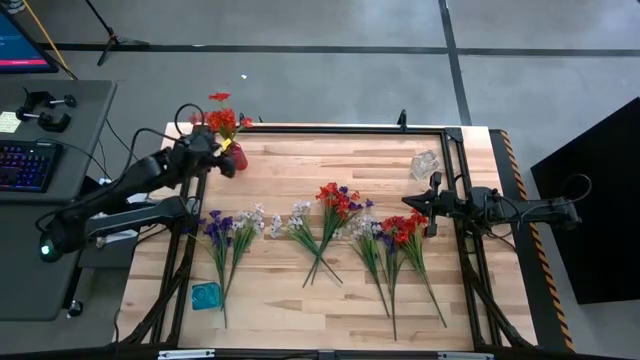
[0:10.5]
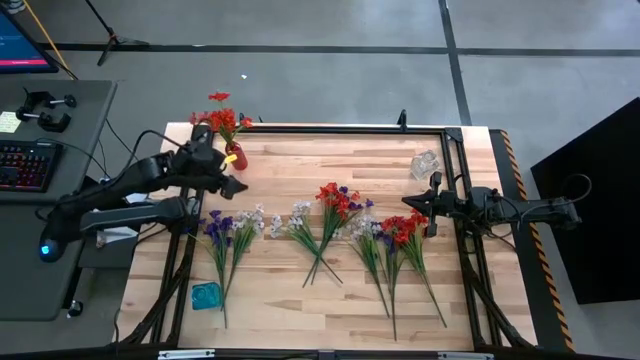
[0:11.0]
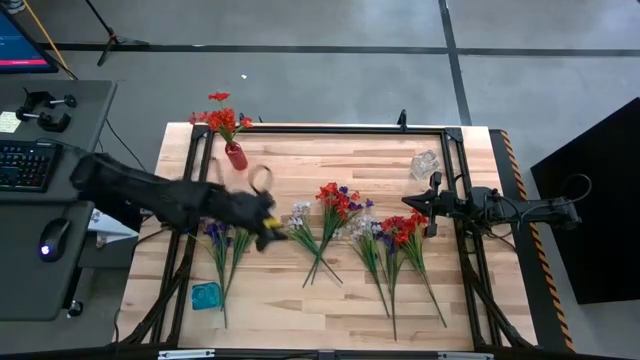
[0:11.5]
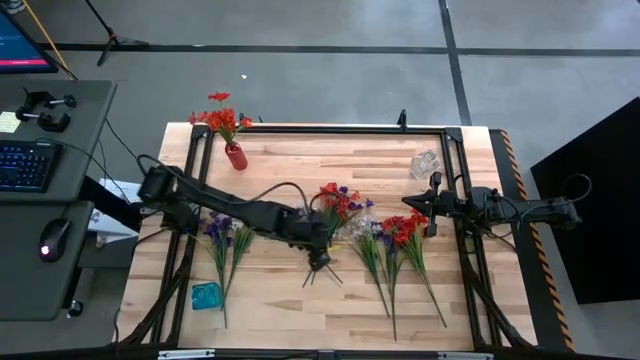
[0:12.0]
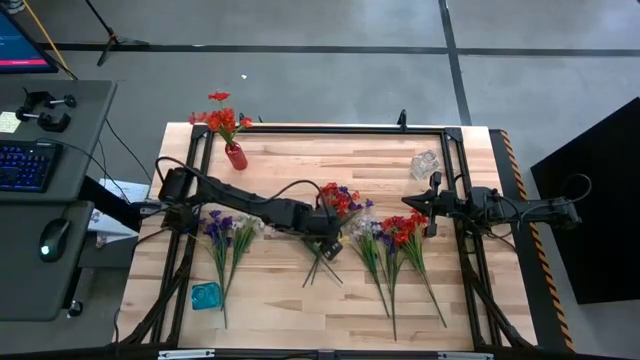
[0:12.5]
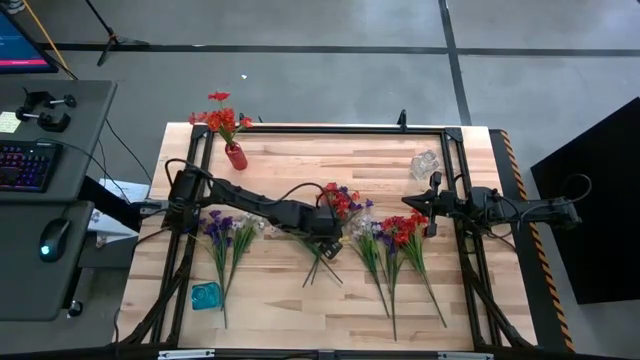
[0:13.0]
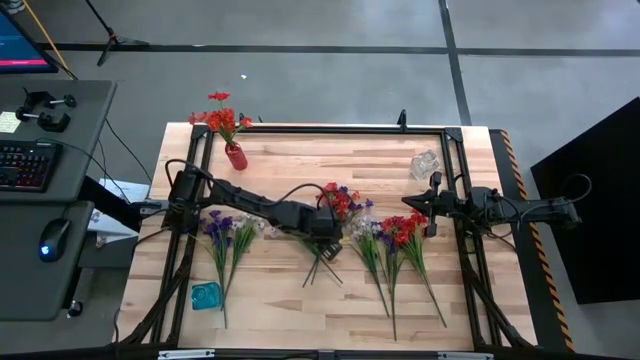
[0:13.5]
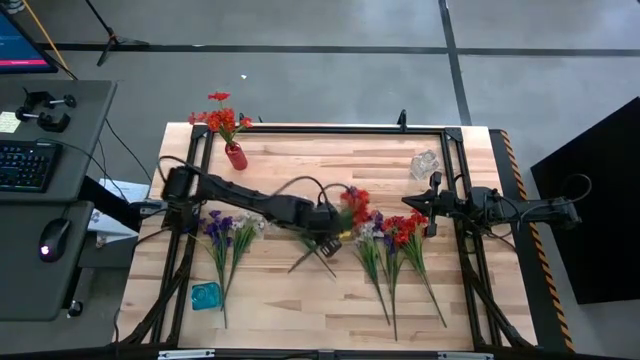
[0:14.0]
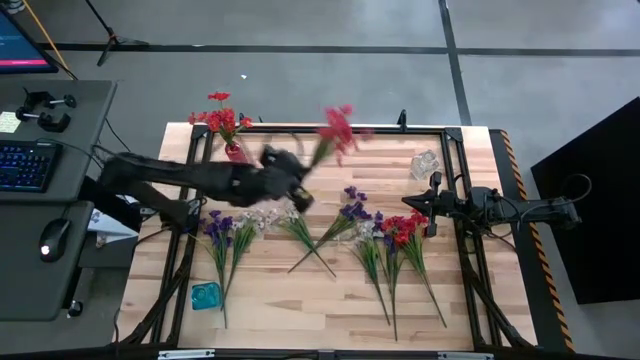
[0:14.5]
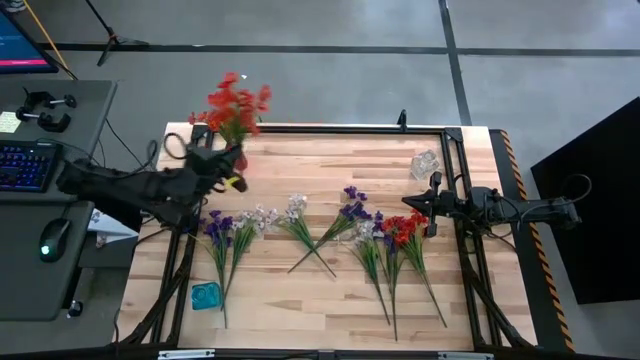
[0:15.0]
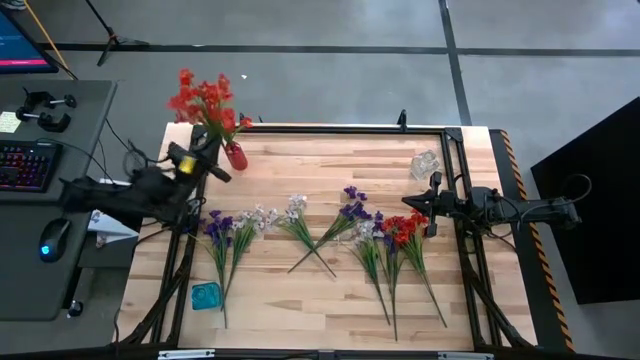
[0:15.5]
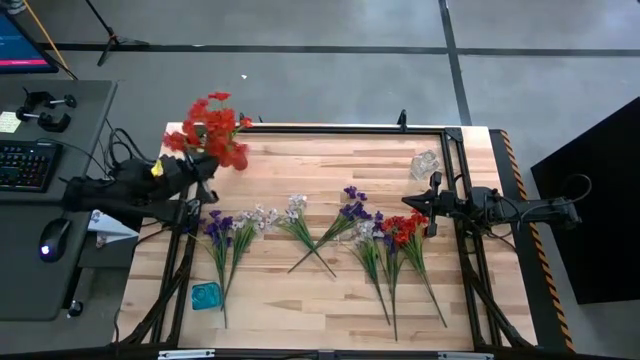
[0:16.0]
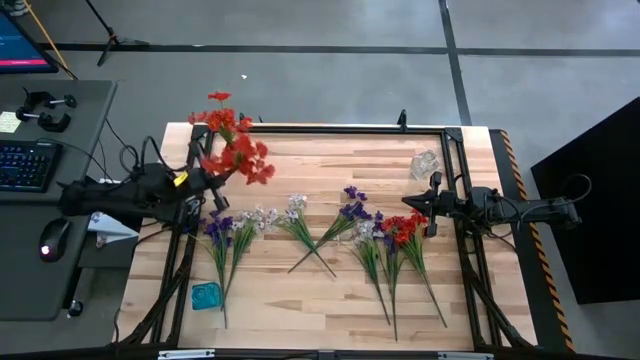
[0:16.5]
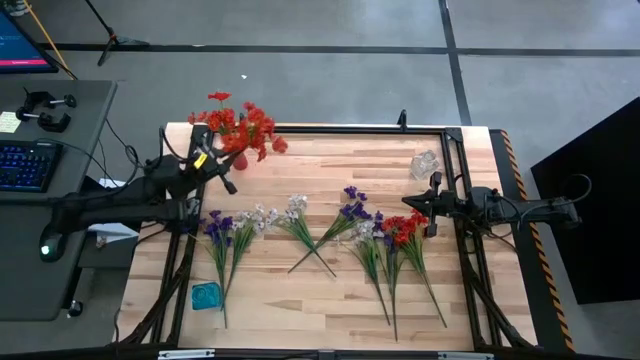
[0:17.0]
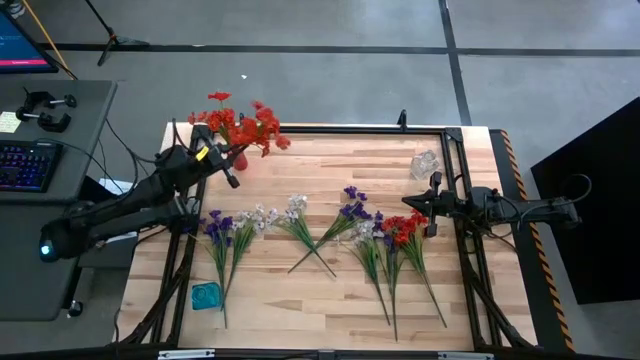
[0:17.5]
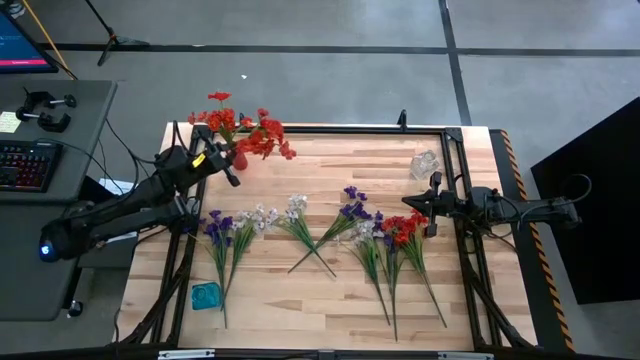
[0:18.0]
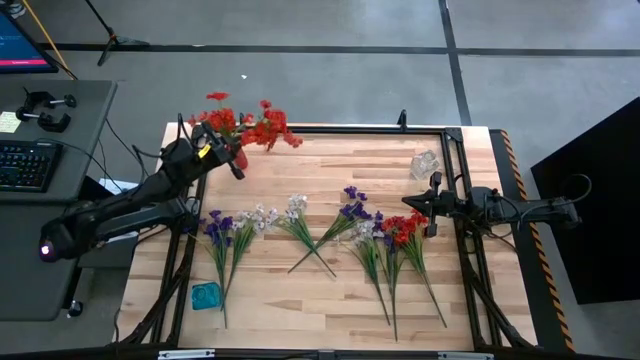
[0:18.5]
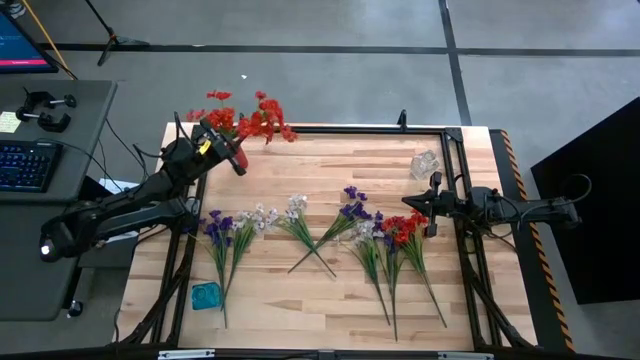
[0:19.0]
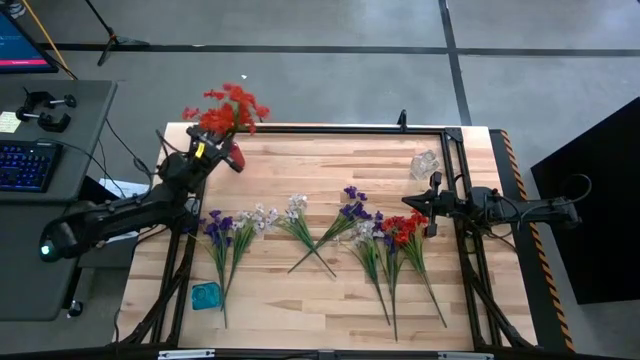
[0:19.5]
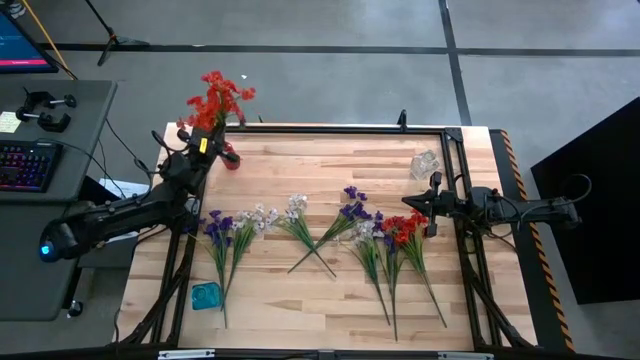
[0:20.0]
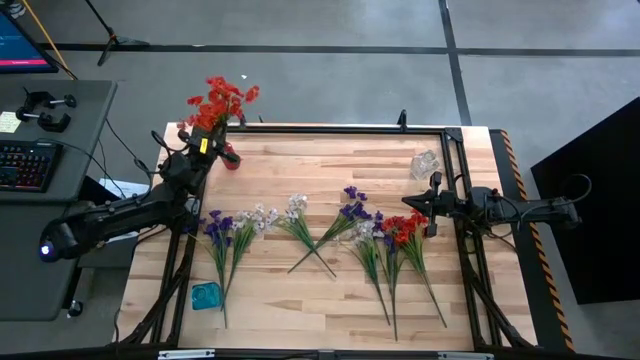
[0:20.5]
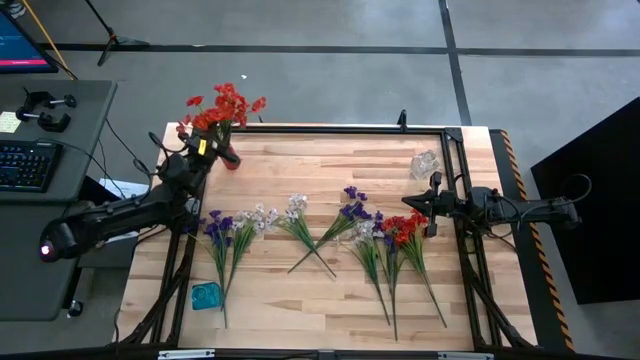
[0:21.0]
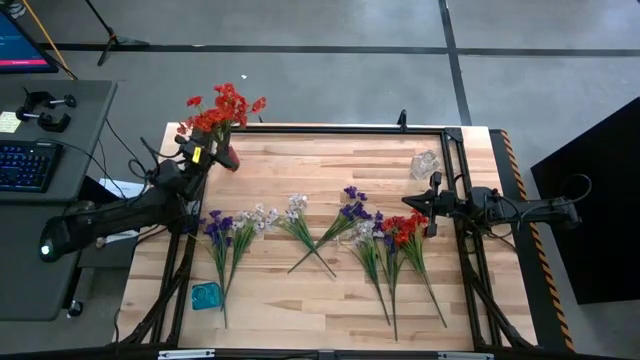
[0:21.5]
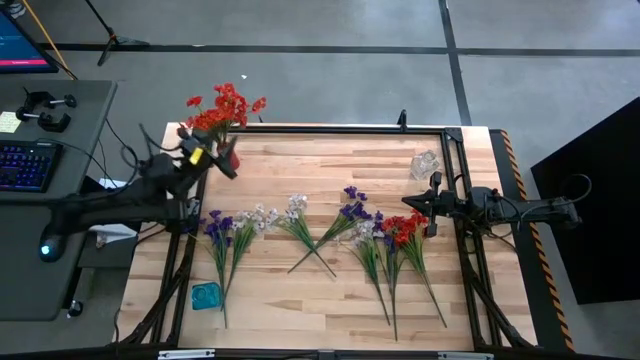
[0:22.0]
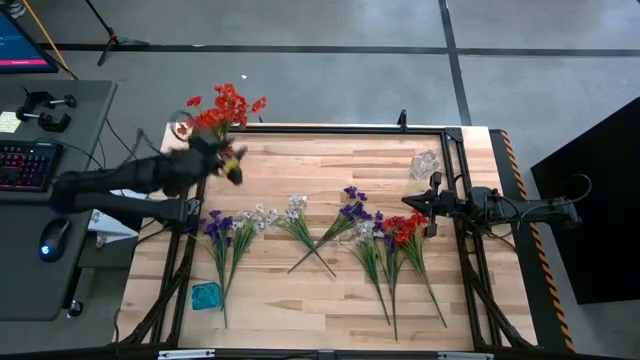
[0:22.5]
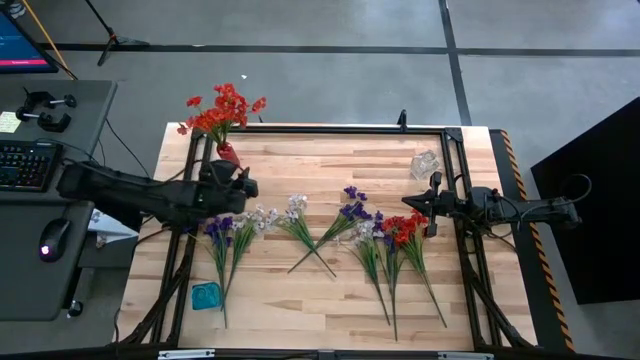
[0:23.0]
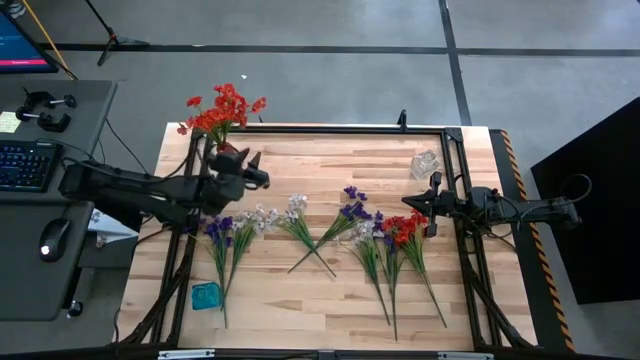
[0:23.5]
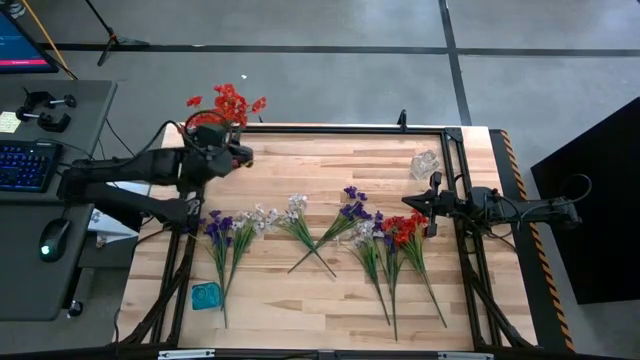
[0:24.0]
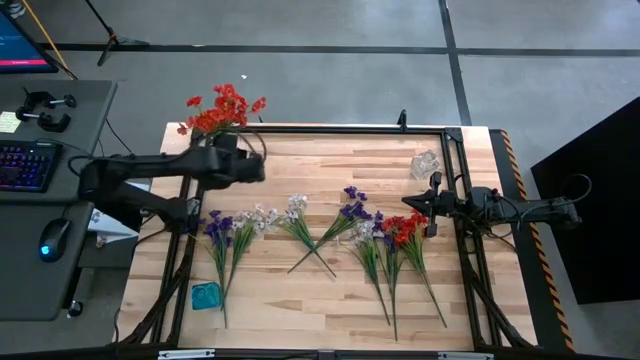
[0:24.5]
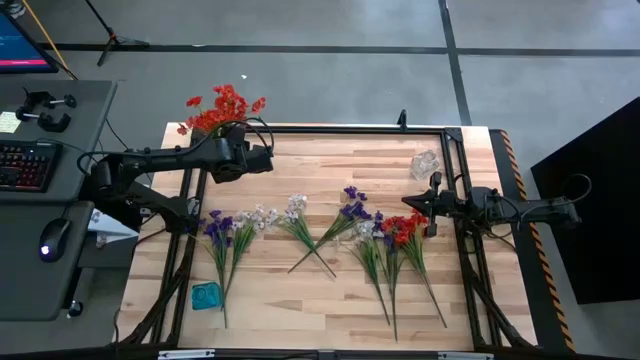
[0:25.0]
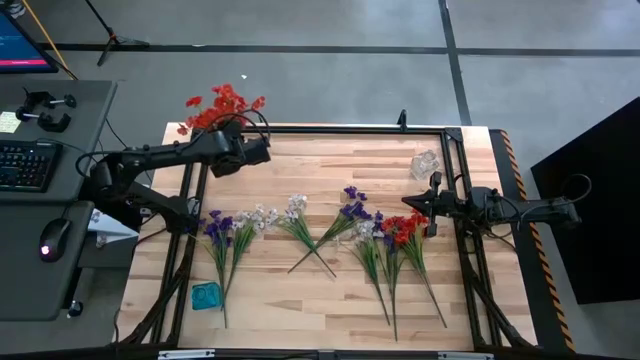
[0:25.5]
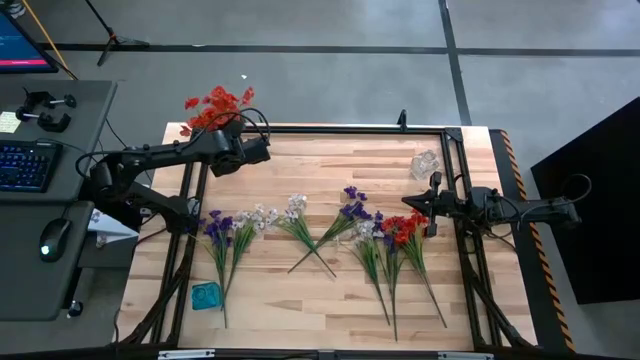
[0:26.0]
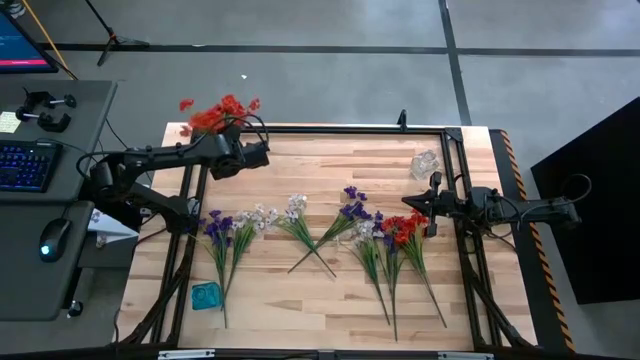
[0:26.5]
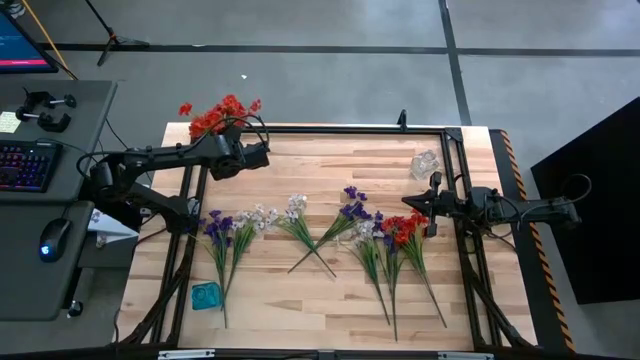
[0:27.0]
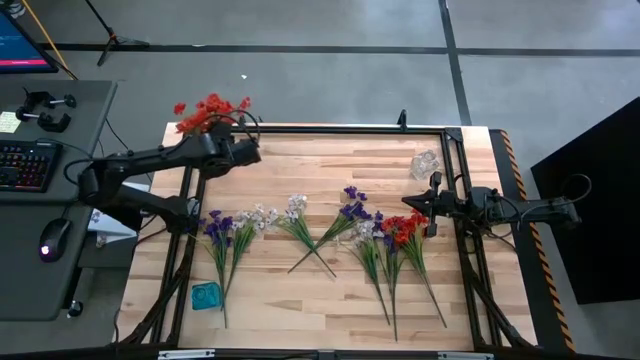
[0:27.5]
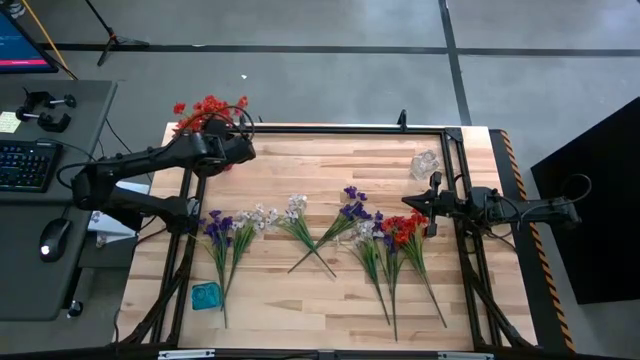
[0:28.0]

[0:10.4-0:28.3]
Task: Sort flowers into vase by color
Put the left red flowers into the red vase

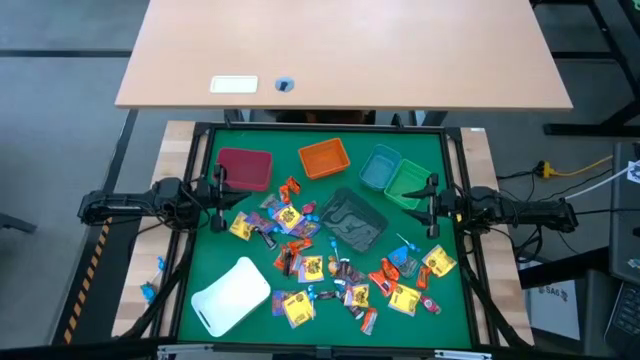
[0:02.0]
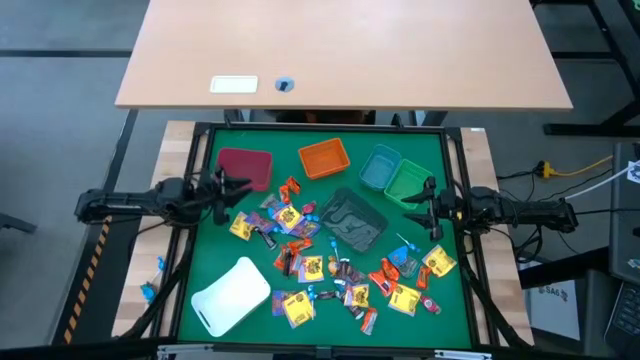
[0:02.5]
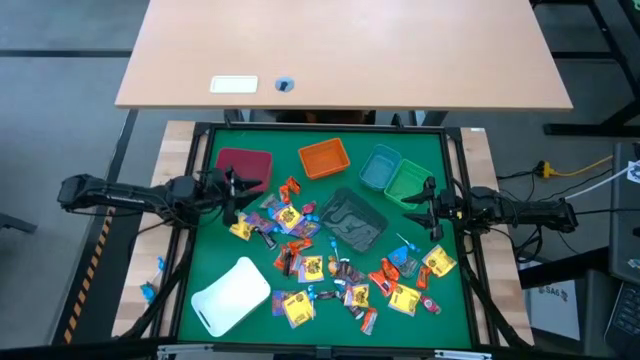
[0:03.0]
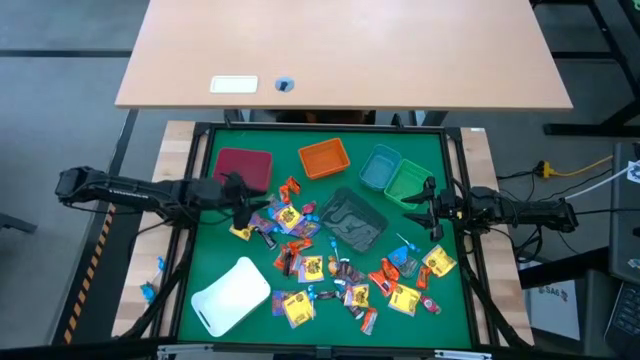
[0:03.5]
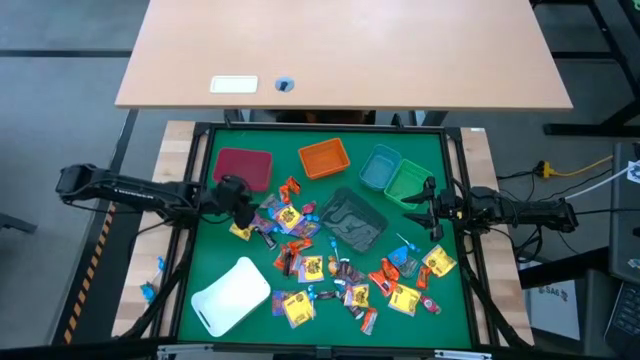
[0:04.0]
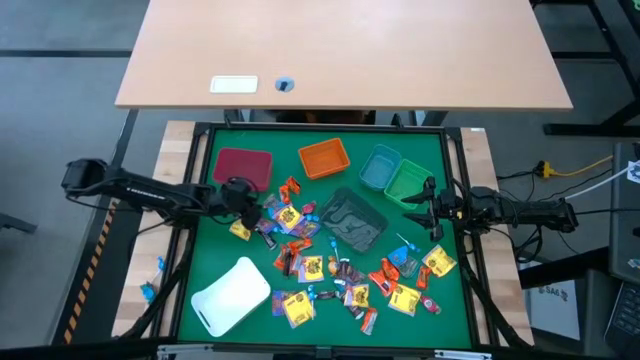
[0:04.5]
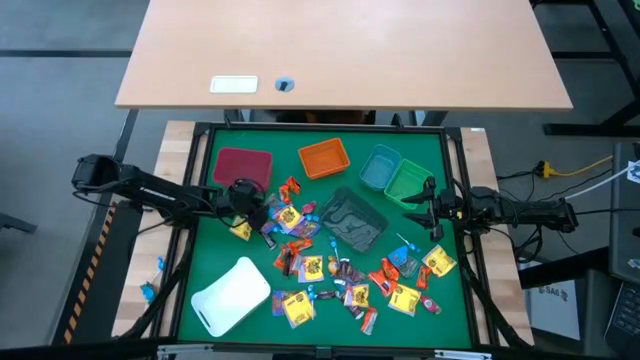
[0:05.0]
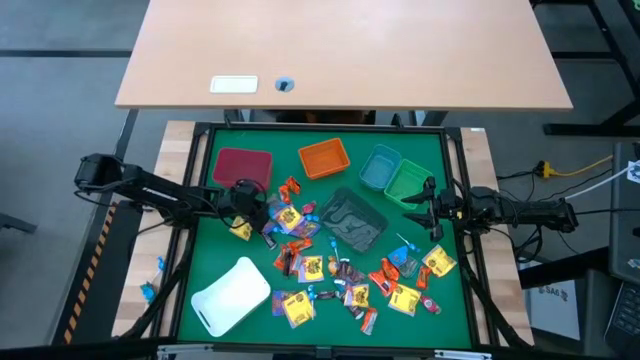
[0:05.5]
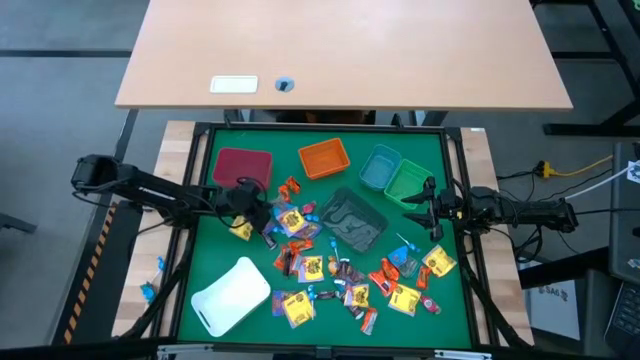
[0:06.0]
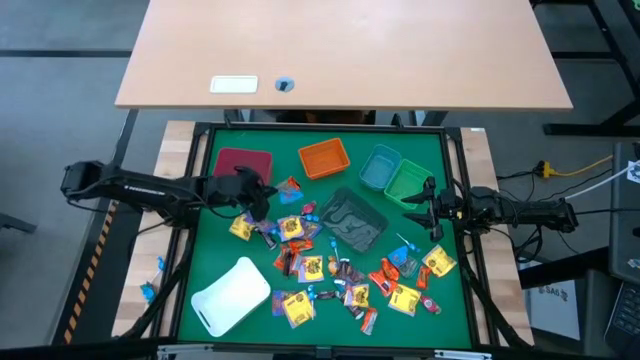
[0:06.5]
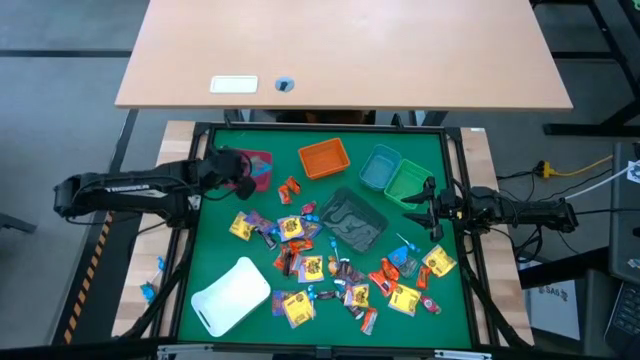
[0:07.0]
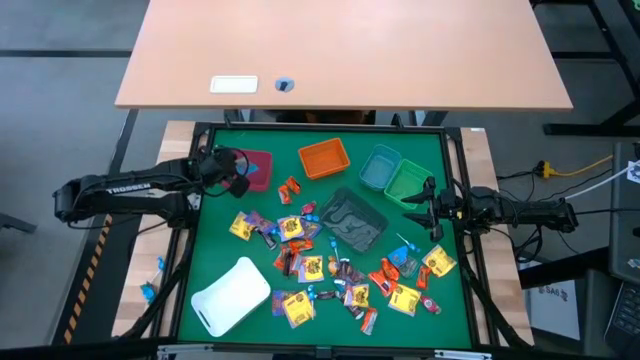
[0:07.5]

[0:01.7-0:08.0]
Task: Sort candy
Put the blue gummy pack into the red bin
